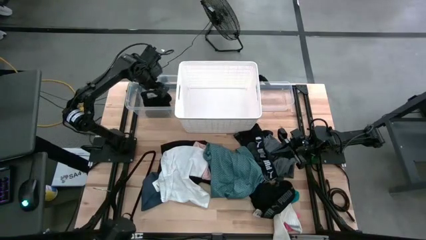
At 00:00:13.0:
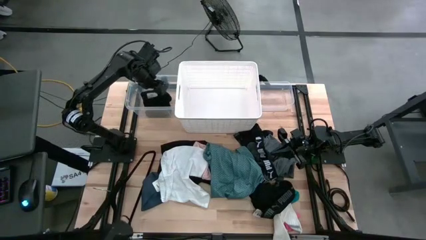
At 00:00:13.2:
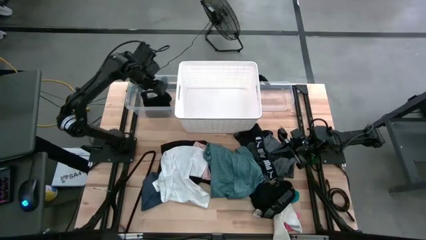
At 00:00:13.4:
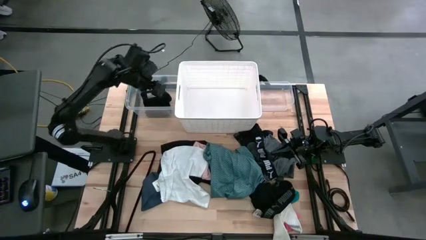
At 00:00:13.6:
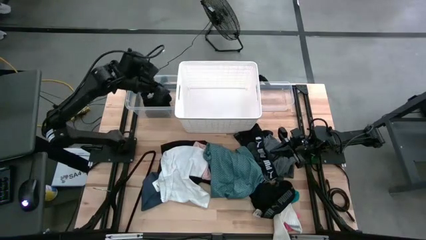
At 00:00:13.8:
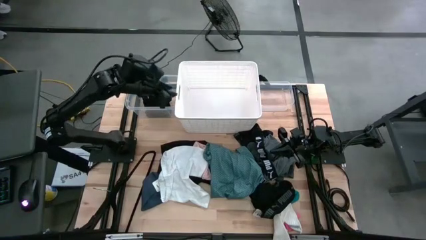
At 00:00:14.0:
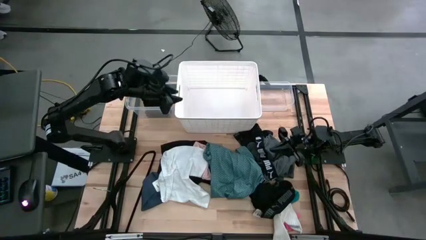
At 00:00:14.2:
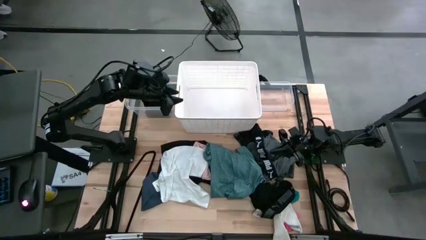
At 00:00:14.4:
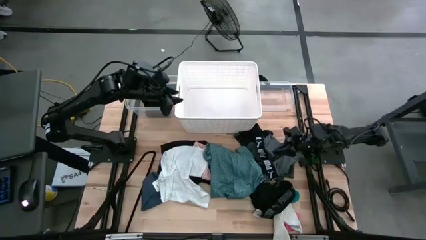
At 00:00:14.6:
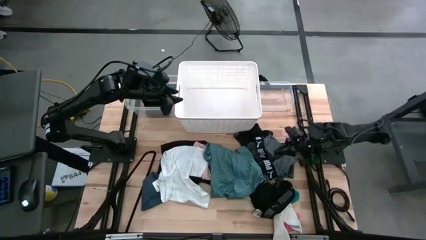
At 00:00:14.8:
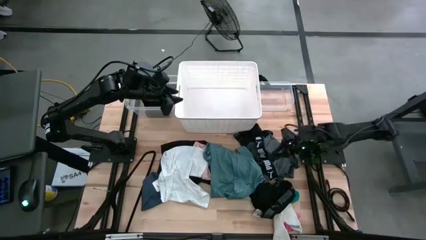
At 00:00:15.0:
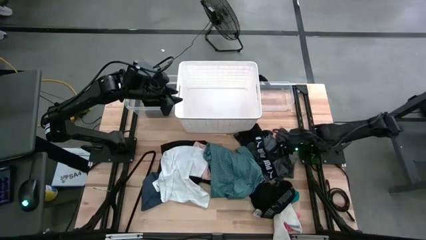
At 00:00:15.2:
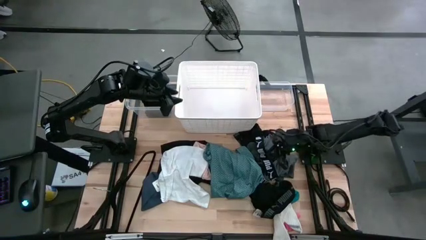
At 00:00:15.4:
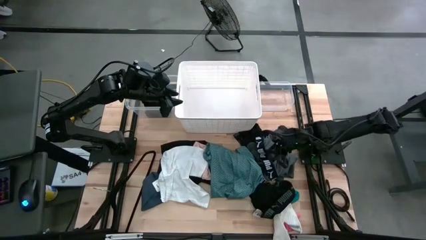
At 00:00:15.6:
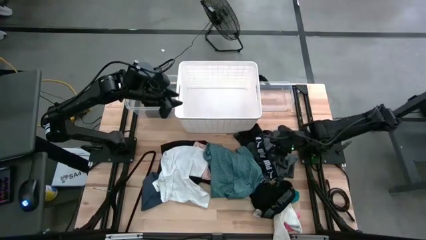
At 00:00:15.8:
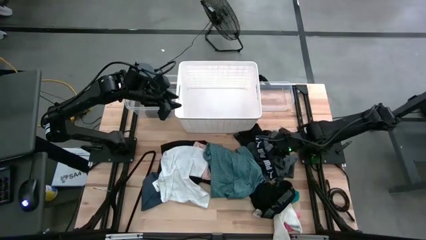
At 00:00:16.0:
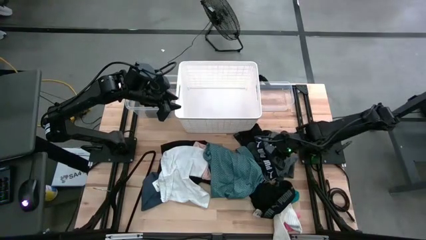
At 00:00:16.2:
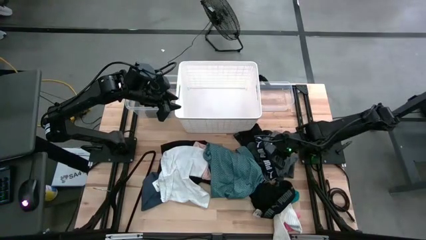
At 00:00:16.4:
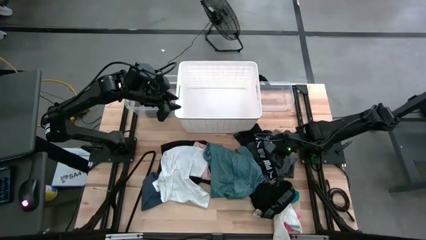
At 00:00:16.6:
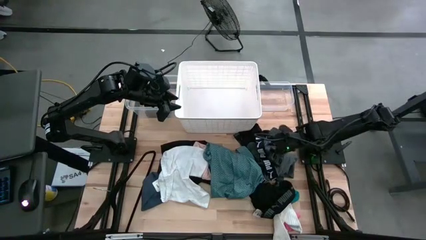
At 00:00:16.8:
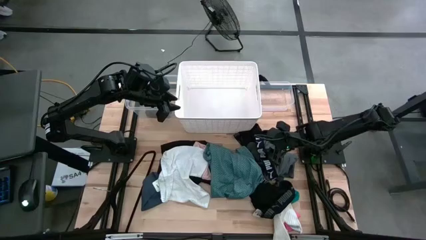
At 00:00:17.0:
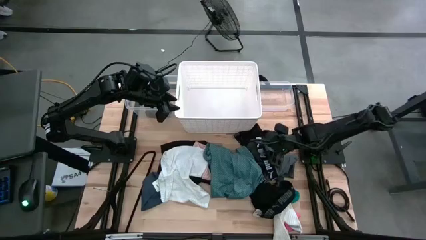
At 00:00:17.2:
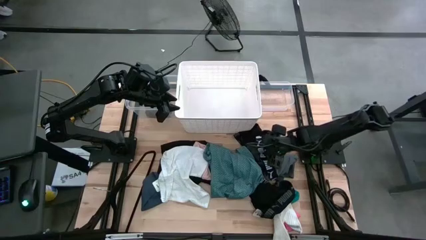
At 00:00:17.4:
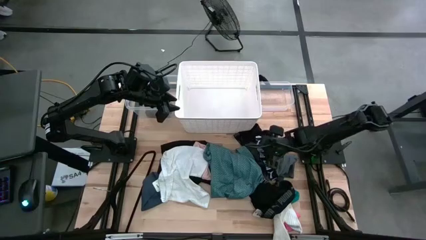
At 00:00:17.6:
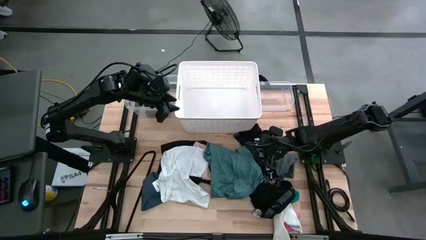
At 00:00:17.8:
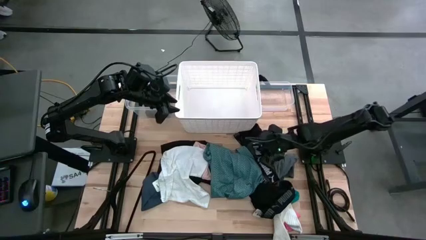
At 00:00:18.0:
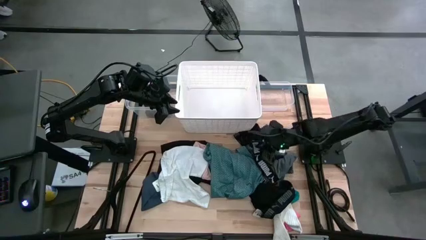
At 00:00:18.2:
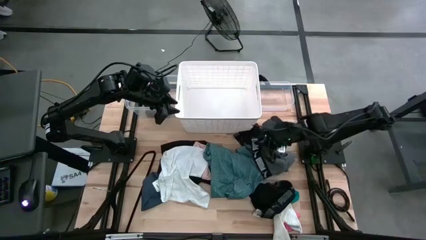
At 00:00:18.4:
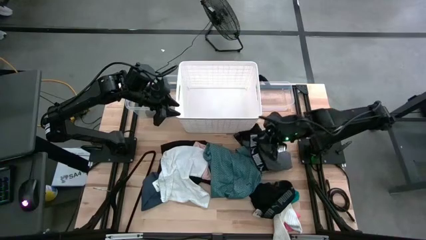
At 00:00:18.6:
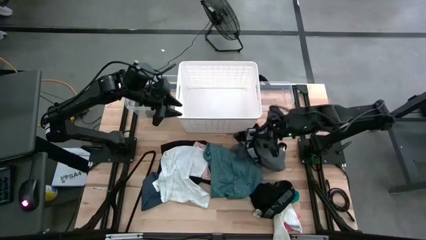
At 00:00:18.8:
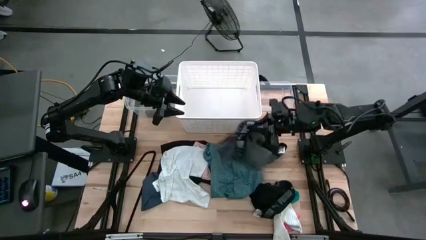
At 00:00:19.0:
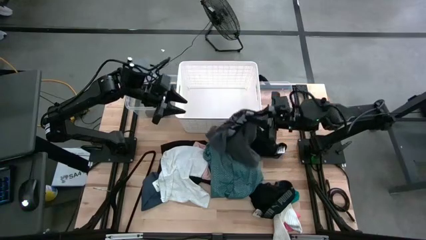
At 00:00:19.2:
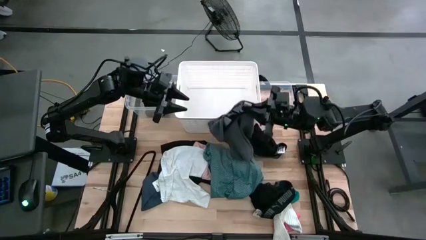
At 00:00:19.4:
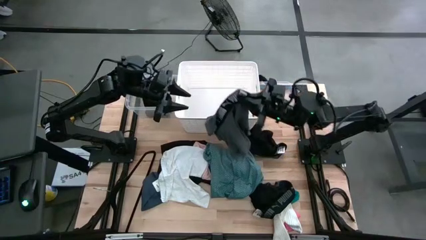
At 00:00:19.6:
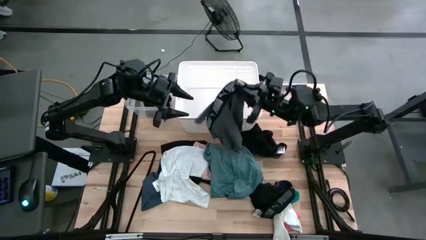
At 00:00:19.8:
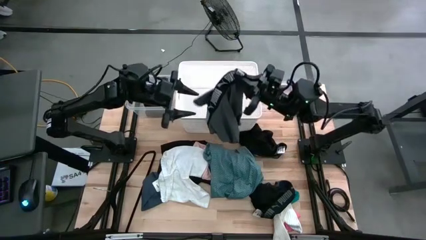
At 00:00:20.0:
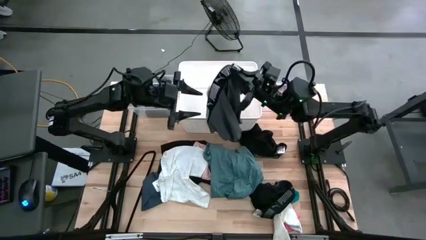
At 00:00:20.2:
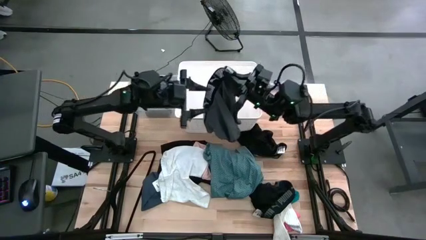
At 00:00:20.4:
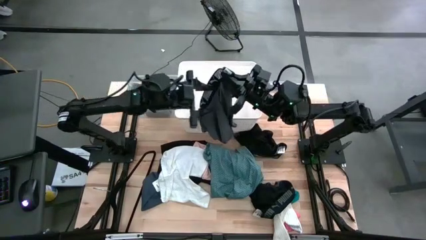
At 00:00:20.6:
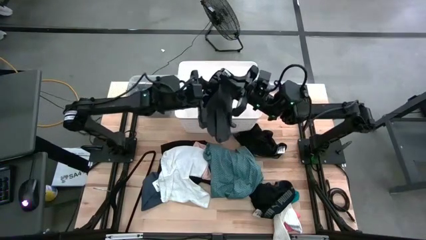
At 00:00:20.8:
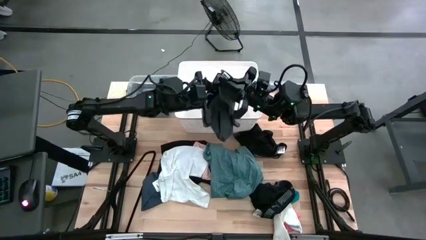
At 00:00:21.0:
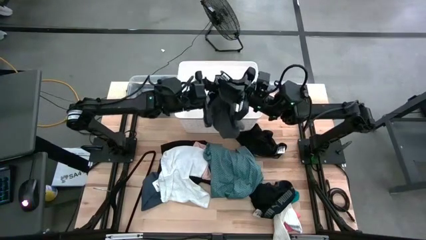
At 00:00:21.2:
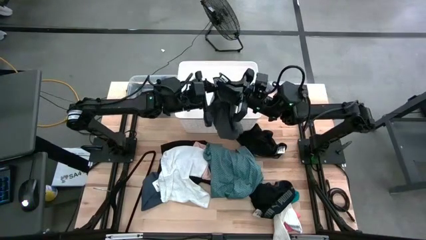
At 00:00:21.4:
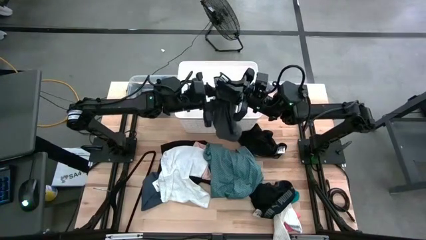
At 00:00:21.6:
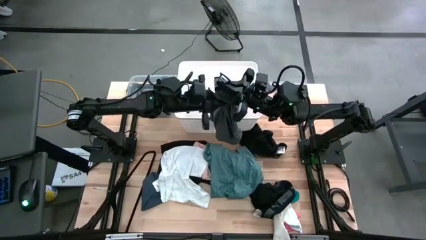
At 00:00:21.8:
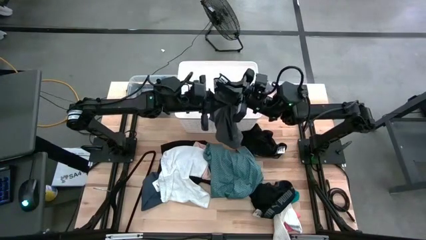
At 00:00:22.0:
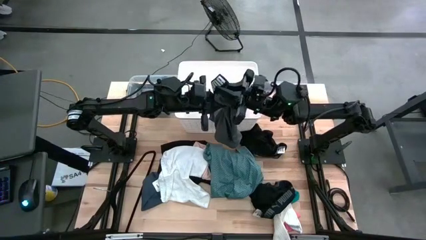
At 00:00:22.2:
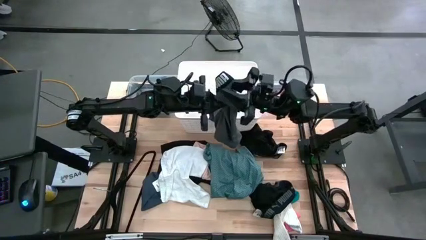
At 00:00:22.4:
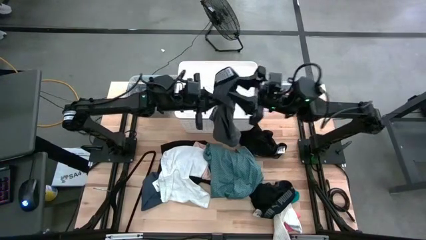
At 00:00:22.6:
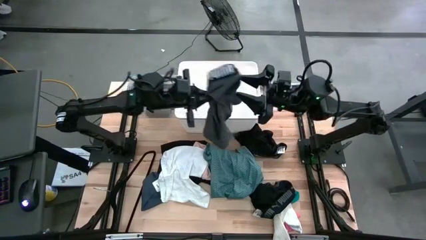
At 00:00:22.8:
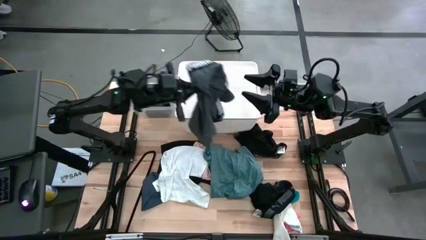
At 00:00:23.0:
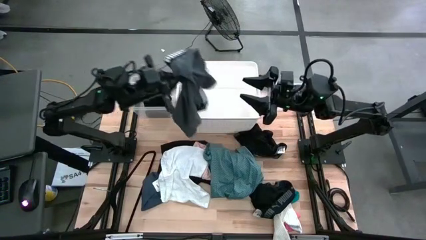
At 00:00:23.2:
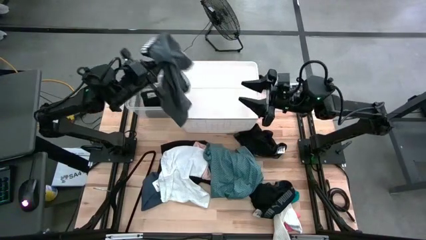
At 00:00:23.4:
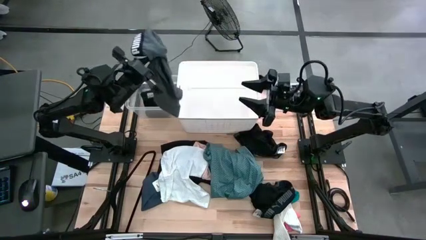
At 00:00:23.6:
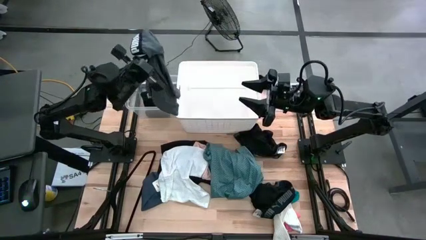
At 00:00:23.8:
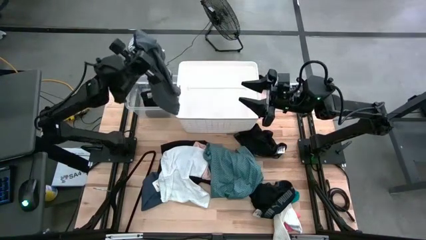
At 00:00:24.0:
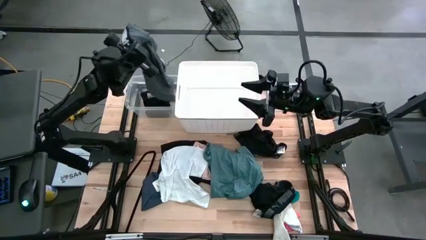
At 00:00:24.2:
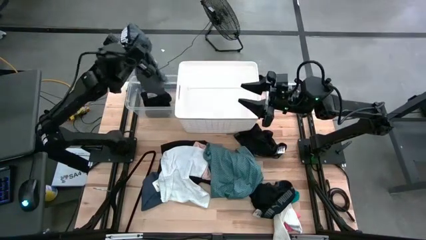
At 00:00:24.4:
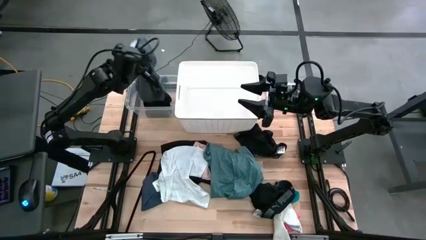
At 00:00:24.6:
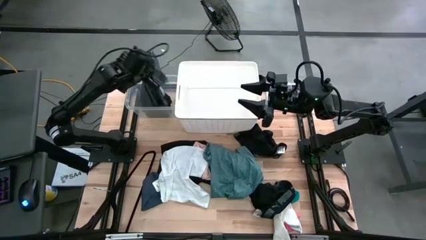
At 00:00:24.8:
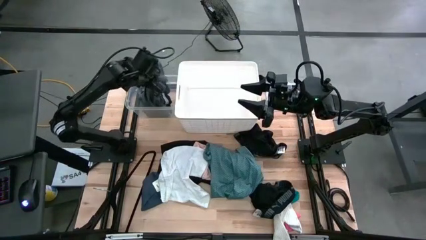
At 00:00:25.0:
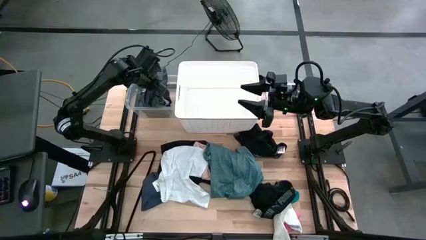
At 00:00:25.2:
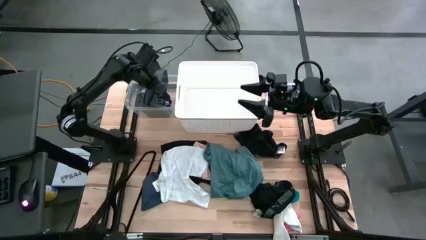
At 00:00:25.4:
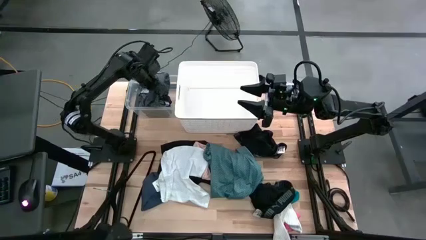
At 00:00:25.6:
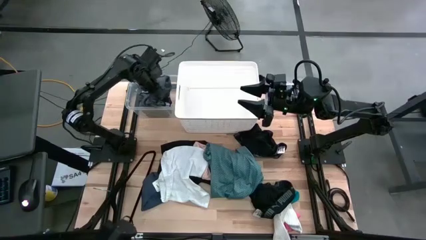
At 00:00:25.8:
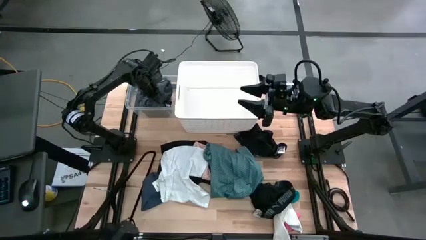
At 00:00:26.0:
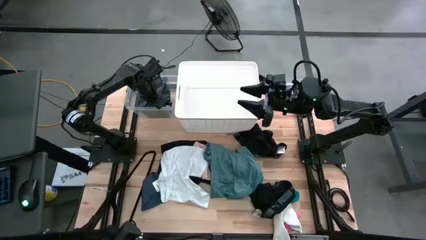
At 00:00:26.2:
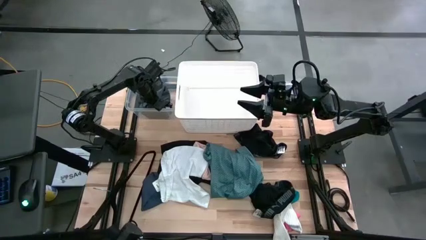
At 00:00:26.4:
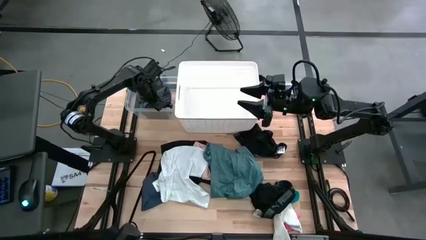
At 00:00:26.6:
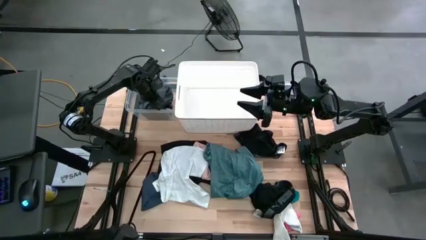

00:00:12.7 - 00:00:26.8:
Task: Pick & Place Cloths
Put the gray boxers into the transparent bin
